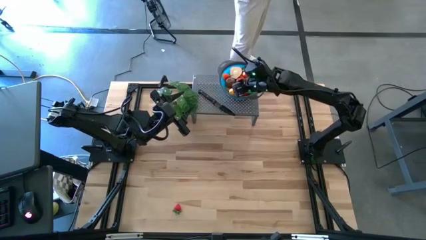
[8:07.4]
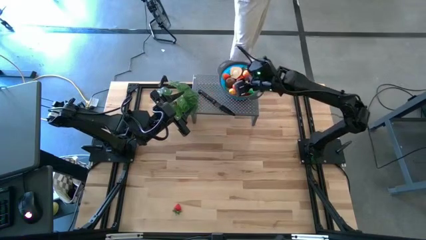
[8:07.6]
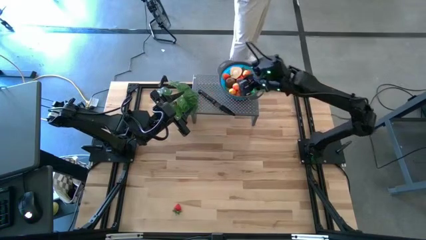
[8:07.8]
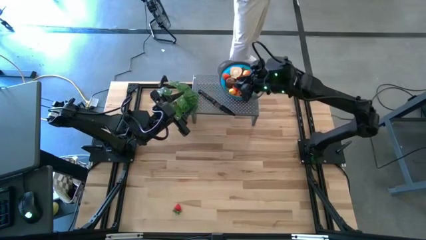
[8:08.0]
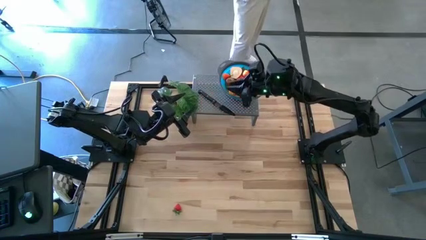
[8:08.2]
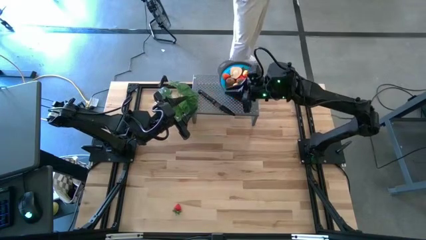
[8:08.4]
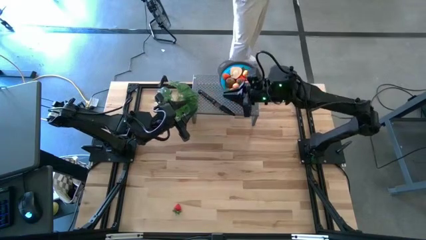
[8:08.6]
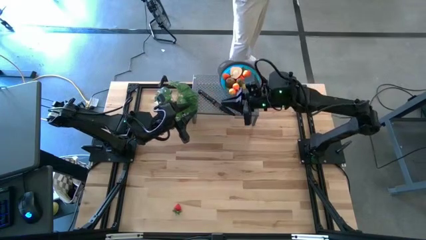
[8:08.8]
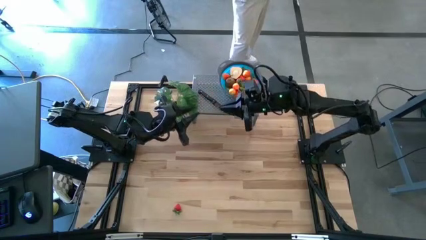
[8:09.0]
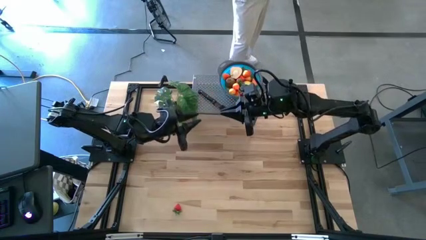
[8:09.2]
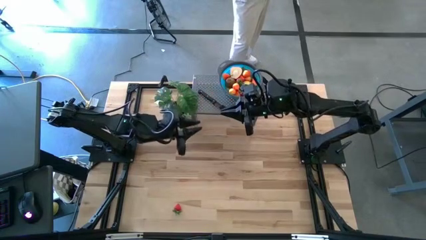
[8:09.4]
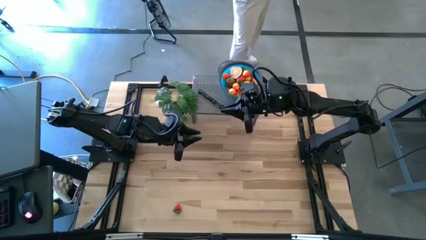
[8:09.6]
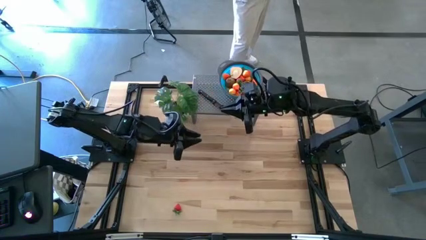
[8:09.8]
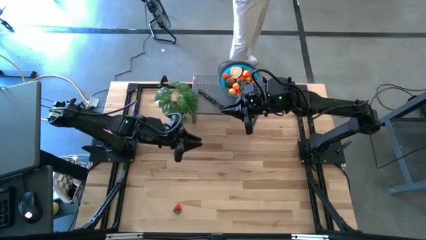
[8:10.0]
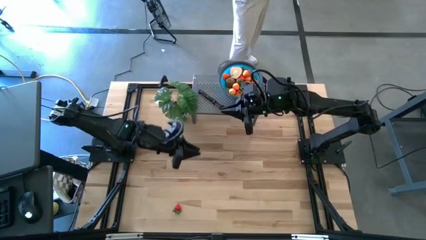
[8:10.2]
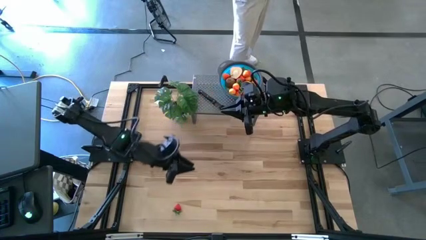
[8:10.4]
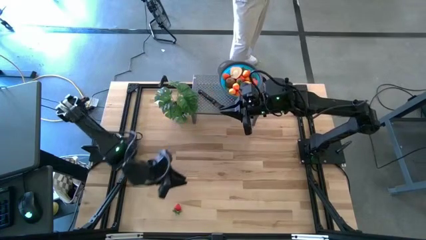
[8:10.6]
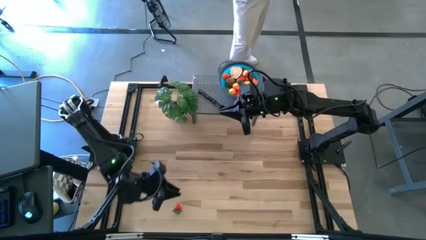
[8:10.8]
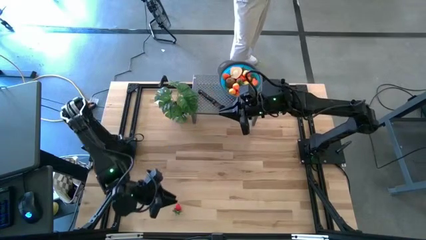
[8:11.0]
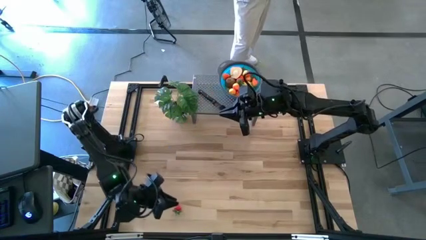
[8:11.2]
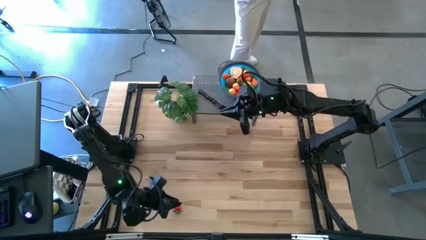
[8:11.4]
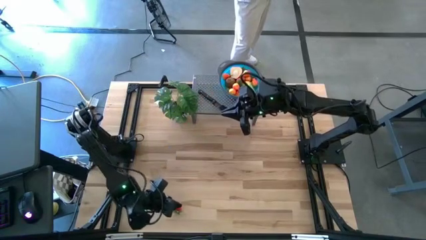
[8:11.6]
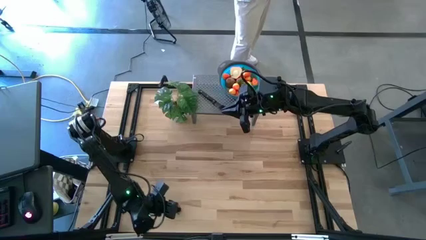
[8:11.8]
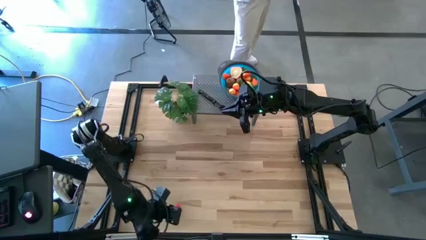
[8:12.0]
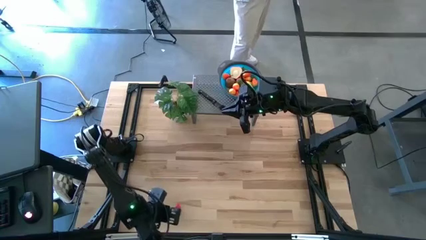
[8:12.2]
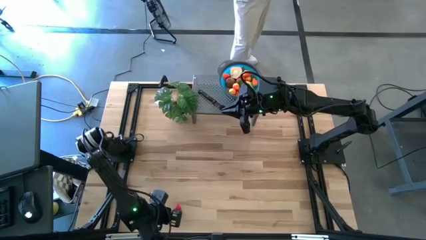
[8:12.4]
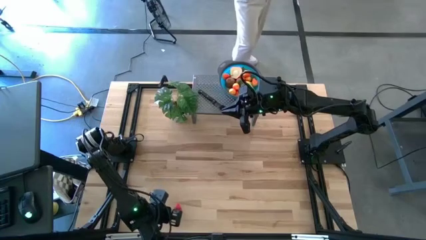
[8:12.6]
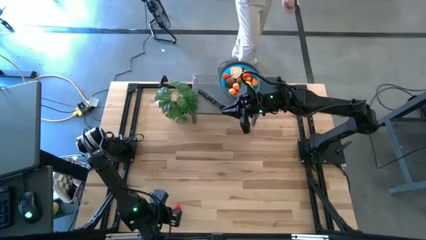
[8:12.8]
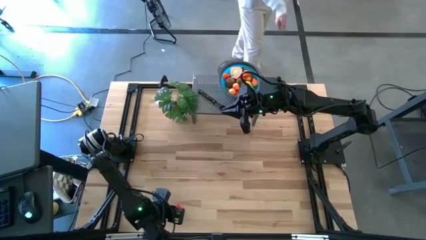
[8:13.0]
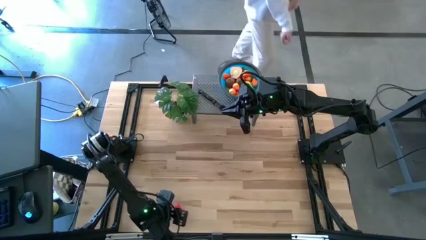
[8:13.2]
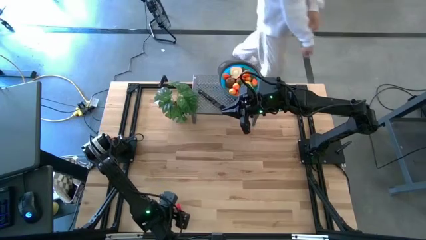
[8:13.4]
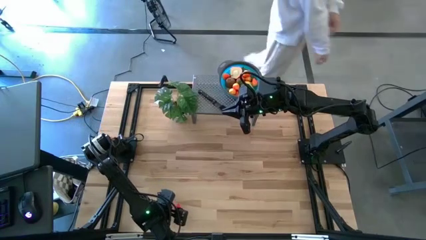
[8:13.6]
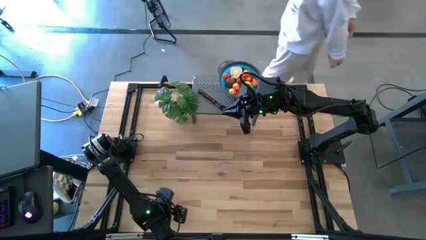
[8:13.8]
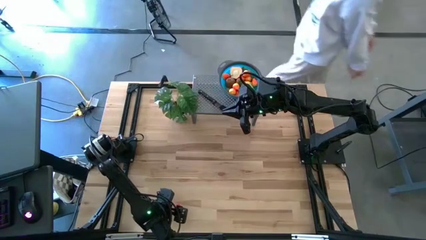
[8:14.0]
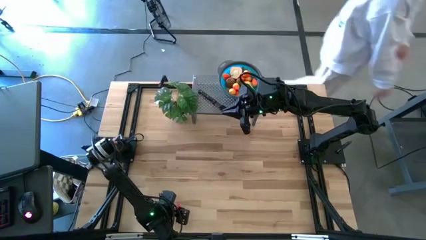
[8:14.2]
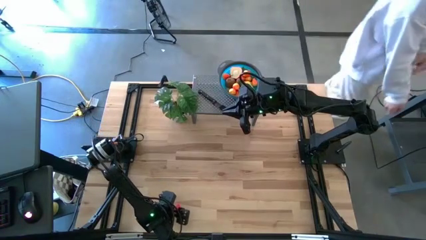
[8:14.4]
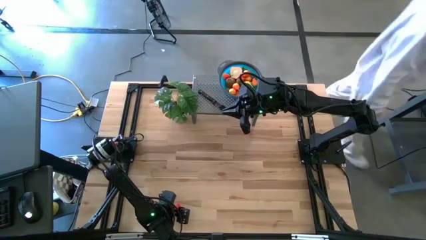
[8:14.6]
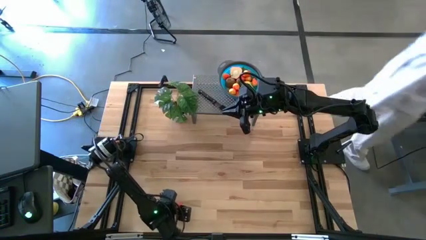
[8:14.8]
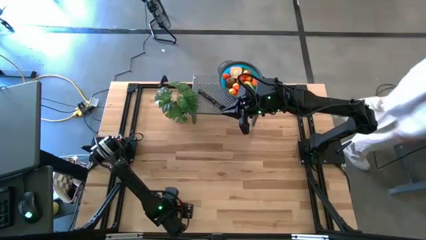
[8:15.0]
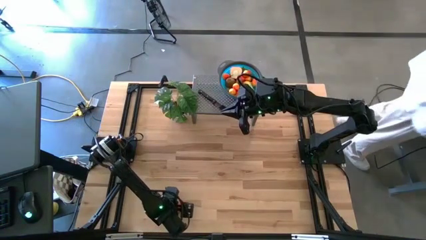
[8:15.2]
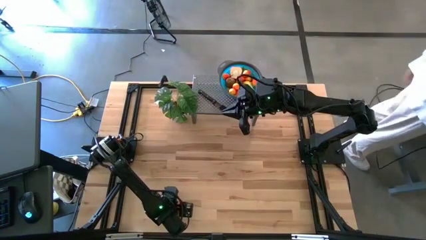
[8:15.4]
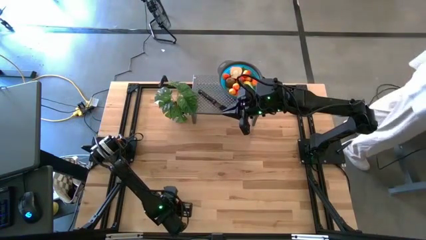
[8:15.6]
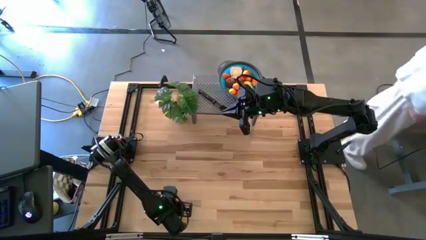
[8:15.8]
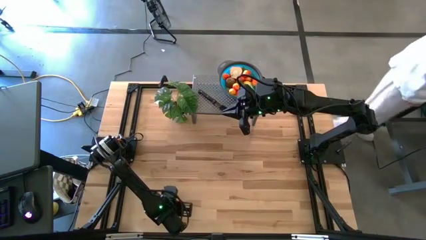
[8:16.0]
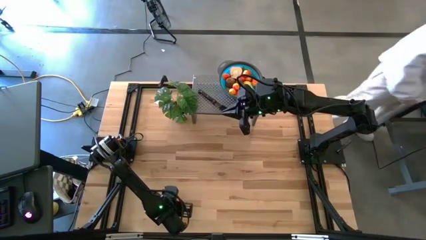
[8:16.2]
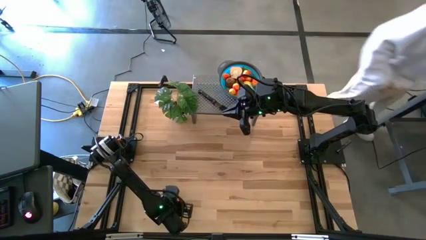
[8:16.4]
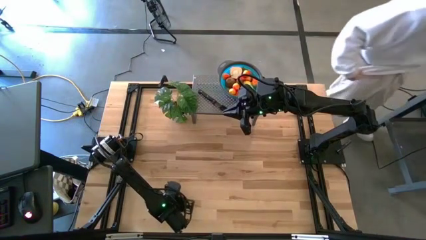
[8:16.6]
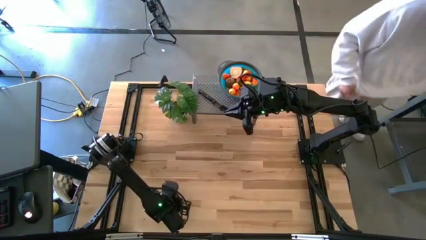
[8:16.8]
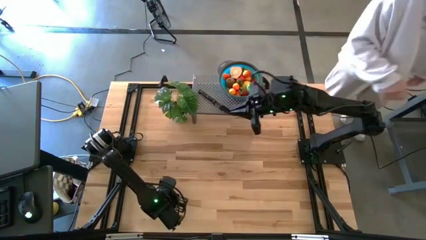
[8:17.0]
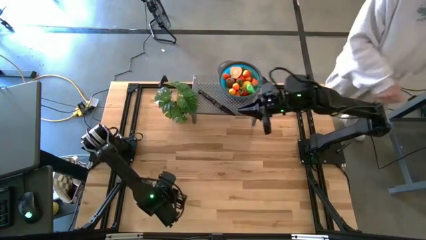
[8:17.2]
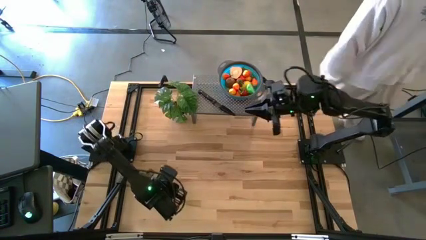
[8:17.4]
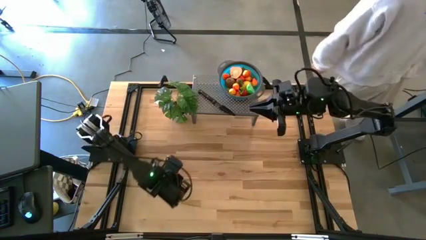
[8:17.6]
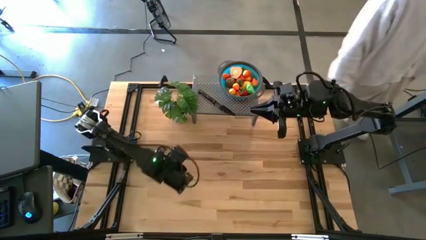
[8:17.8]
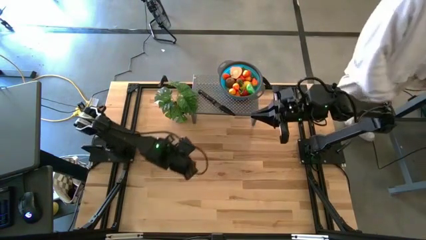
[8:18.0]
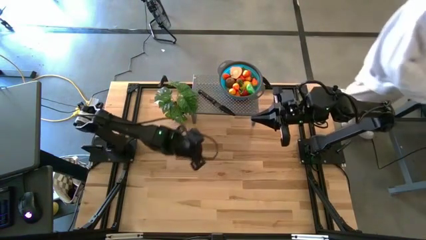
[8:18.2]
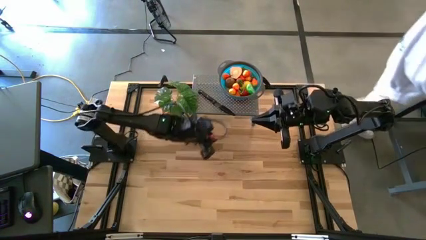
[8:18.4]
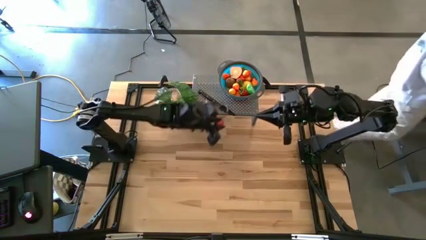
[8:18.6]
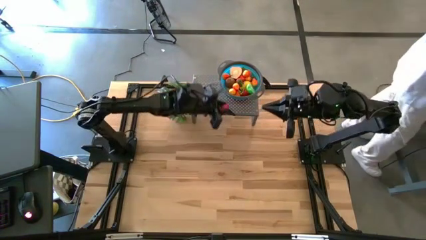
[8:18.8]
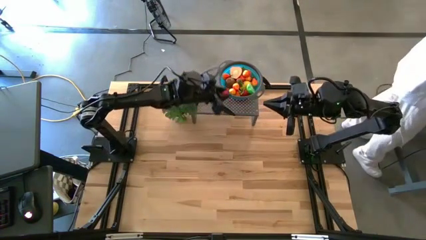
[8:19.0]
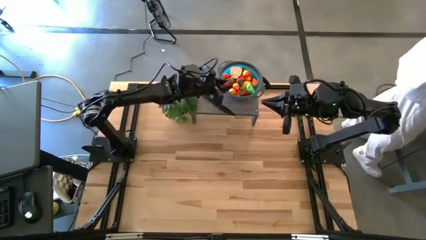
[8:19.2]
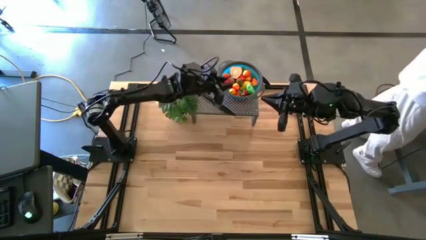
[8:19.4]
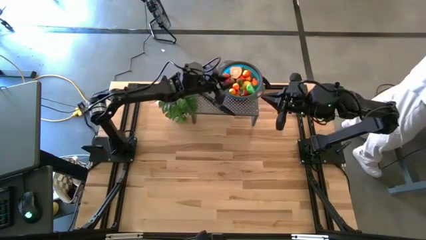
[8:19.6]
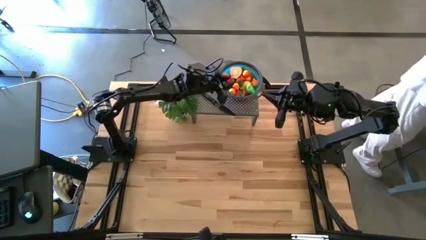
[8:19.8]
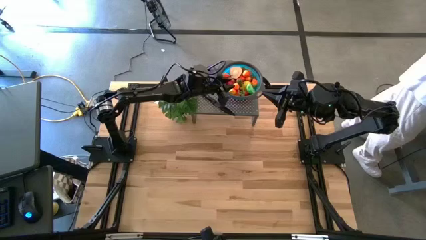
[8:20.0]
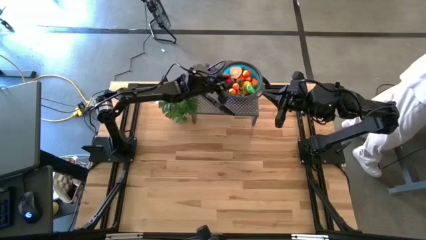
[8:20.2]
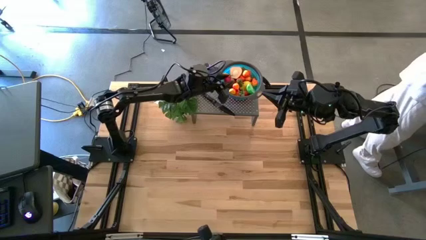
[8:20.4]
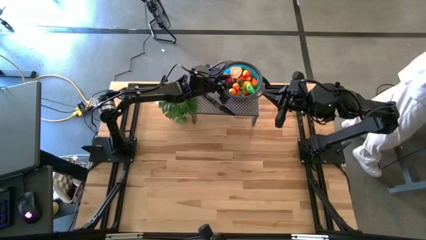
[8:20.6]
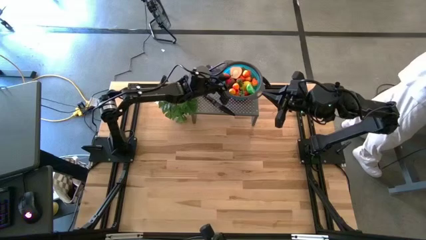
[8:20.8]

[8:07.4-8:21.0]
Task: Pick & Place Fruit
Put the red strawberry in the blue bowl on the shelf

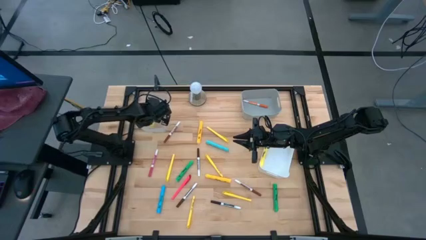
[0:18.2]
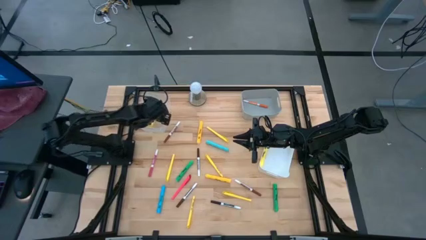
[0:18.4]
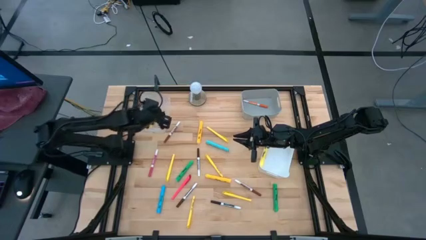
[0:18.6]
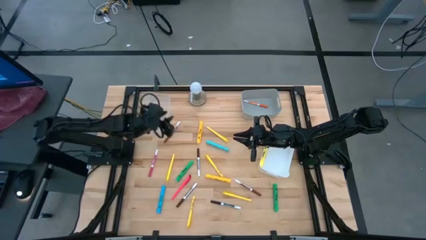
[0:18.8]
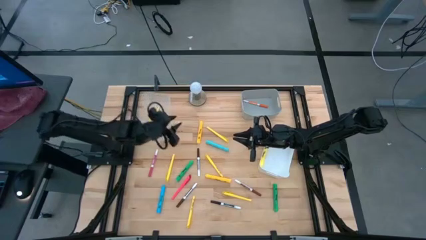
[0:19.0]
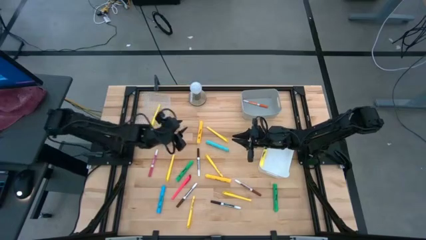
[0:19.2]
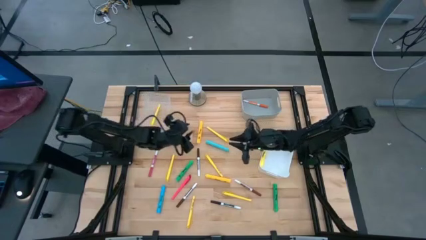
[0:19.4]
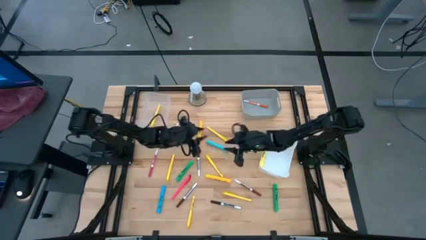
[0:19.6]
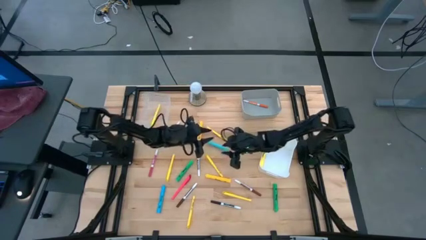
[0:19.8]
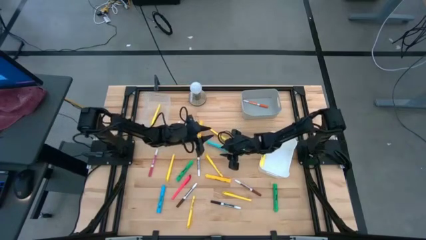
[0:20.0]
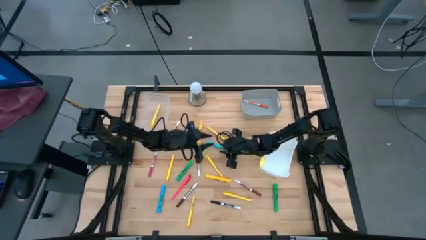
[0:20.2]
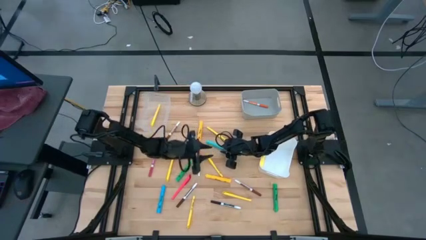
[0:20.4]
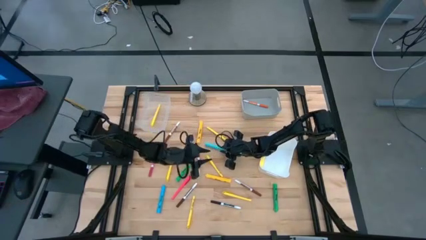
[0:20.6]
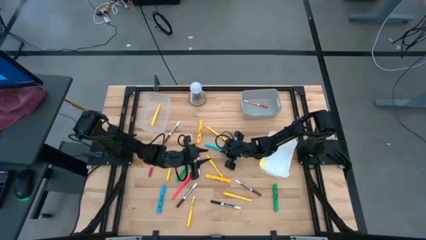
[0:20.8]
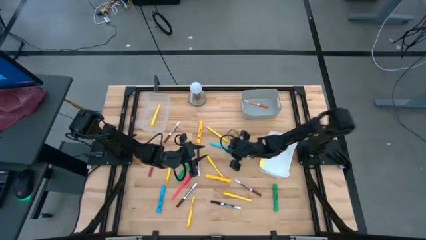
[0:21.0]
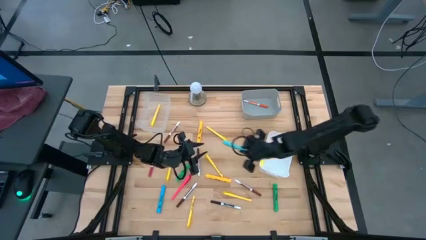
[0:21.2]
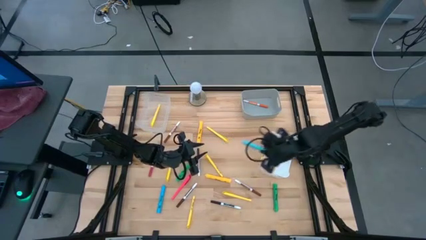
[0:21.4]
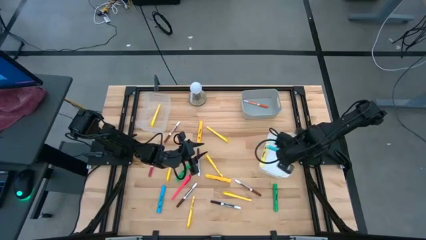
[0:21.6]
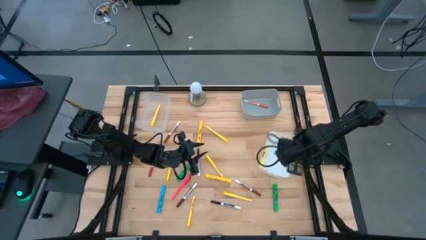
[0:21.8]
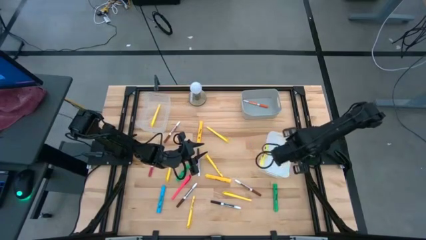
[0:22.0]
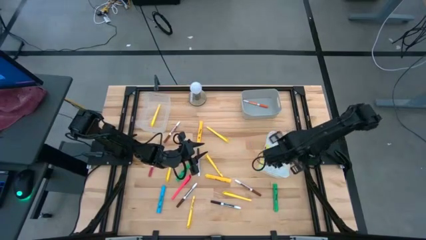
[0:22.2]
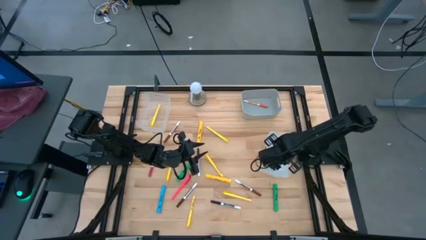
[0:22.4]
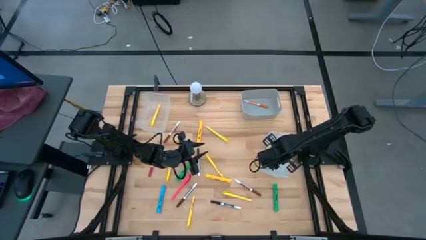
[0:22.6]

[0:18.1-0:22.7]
Task: Pick & Place Markers
Put the light blue highlighter pen into the white bin
